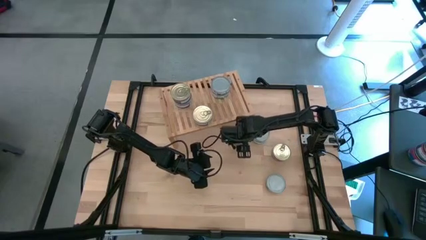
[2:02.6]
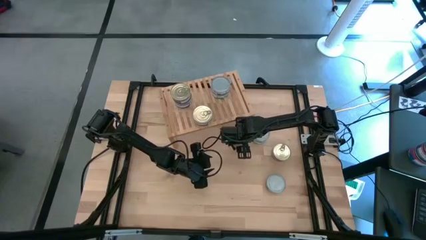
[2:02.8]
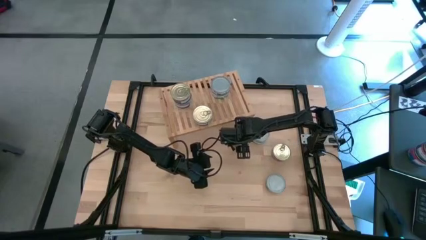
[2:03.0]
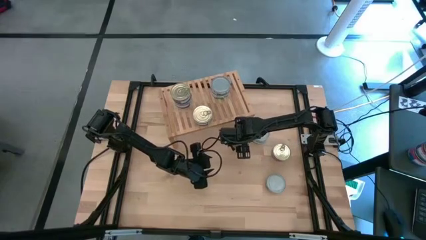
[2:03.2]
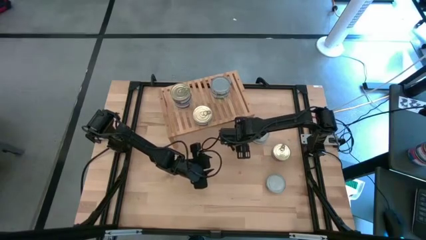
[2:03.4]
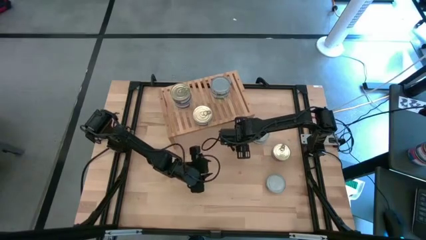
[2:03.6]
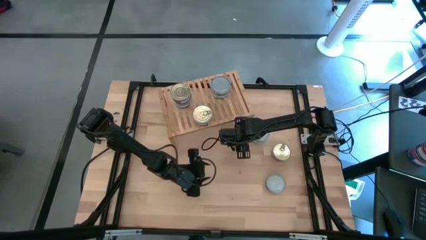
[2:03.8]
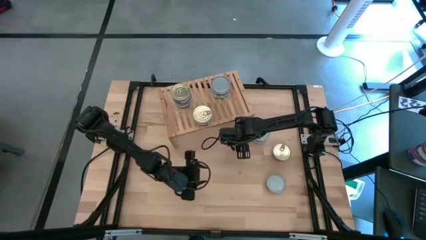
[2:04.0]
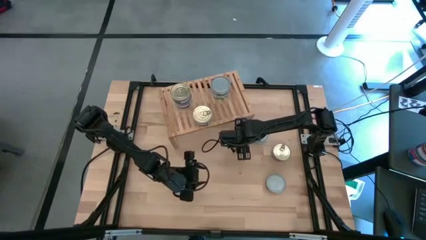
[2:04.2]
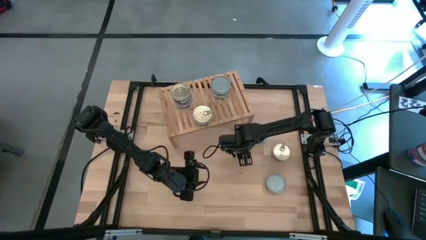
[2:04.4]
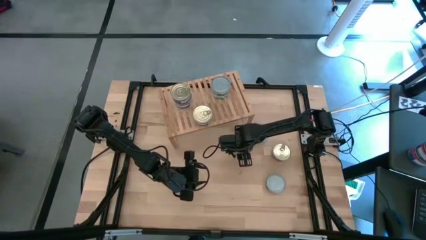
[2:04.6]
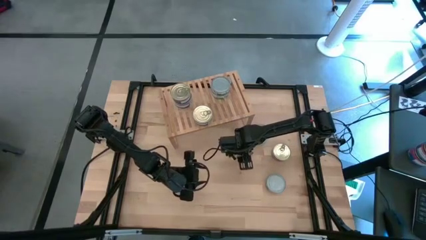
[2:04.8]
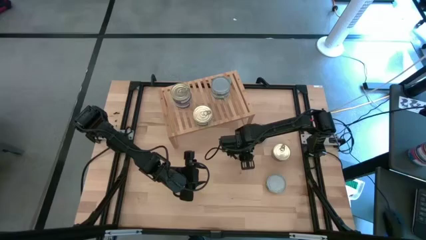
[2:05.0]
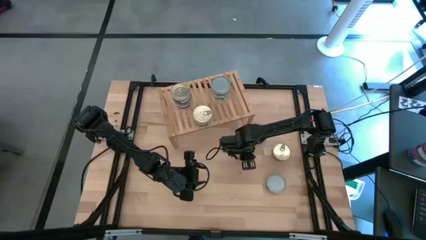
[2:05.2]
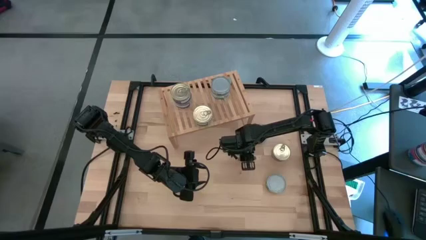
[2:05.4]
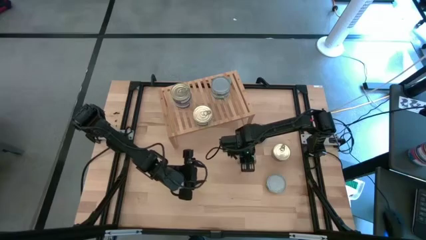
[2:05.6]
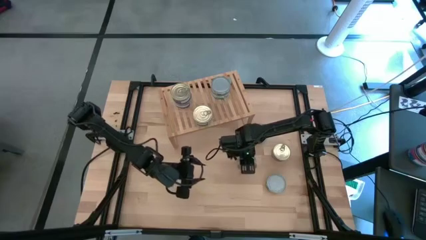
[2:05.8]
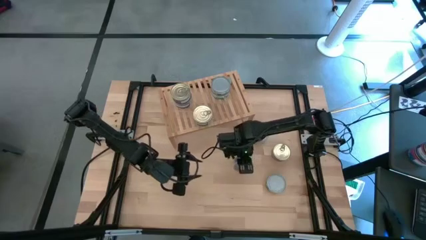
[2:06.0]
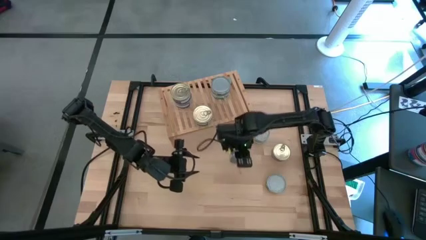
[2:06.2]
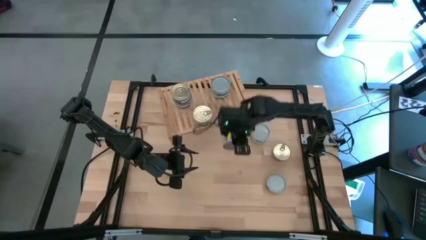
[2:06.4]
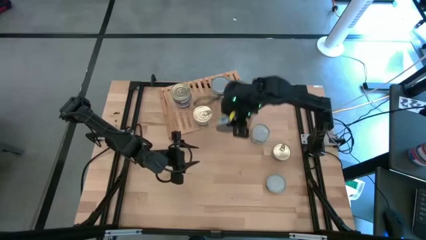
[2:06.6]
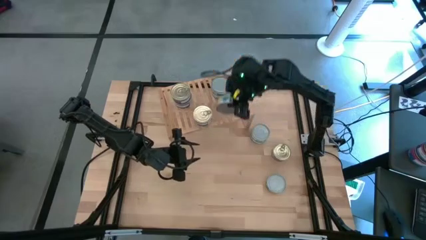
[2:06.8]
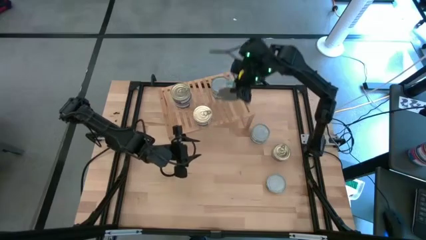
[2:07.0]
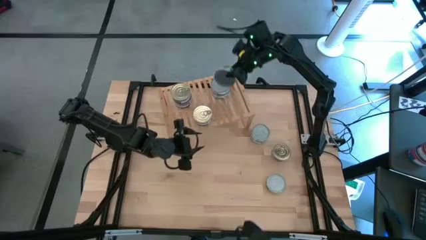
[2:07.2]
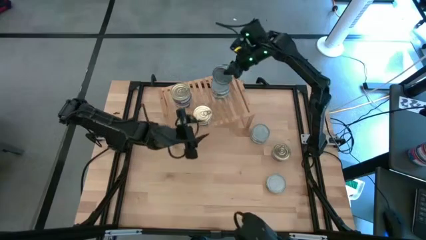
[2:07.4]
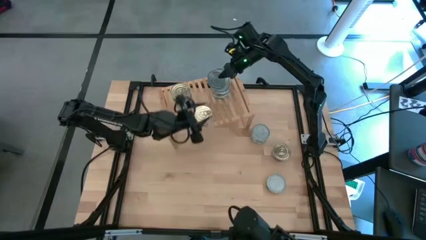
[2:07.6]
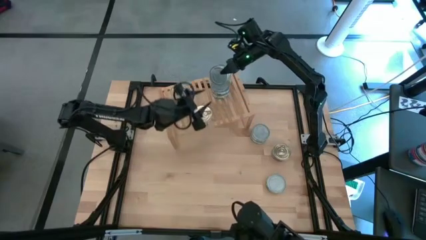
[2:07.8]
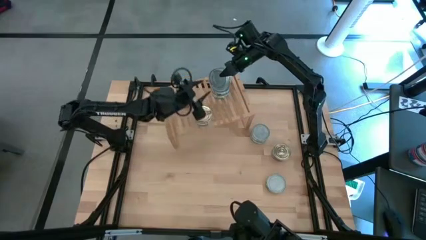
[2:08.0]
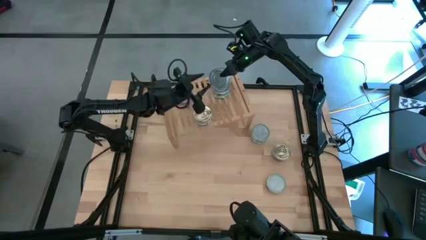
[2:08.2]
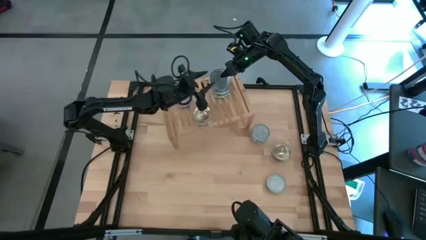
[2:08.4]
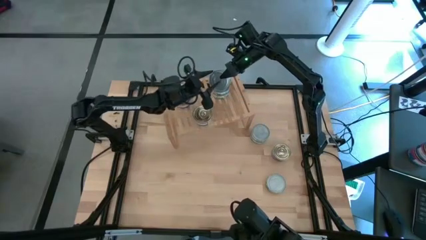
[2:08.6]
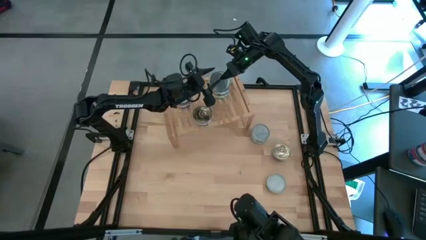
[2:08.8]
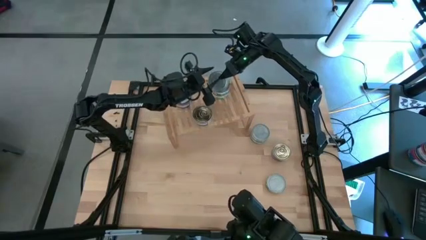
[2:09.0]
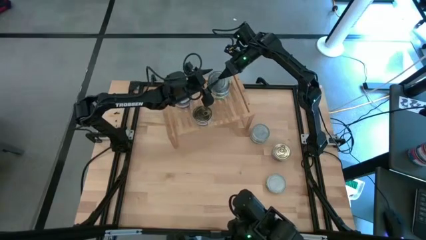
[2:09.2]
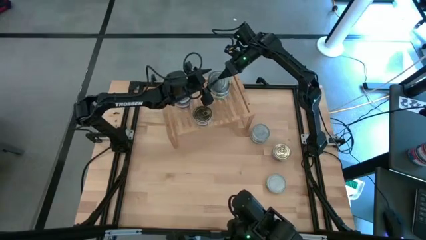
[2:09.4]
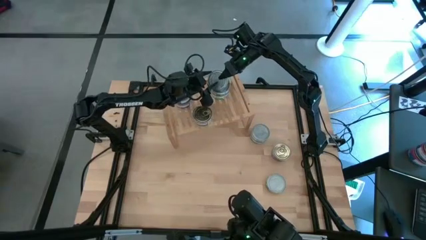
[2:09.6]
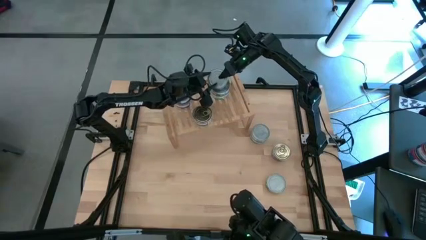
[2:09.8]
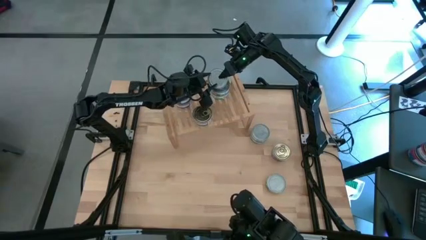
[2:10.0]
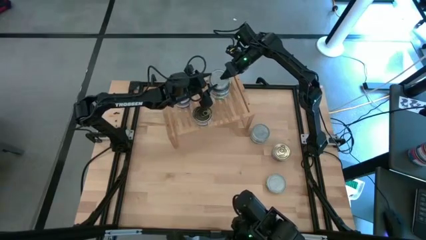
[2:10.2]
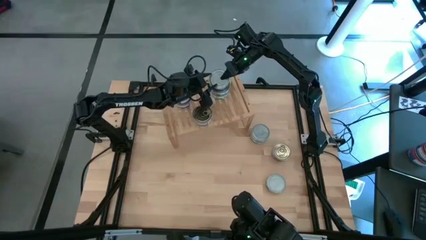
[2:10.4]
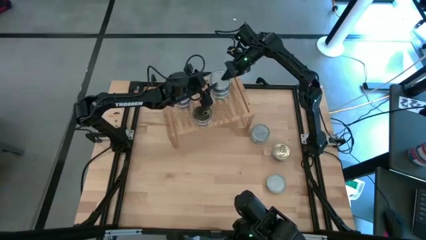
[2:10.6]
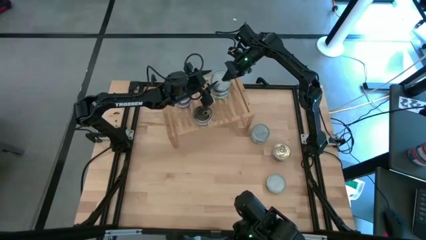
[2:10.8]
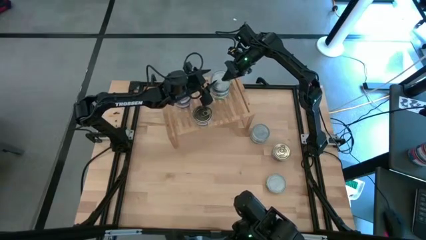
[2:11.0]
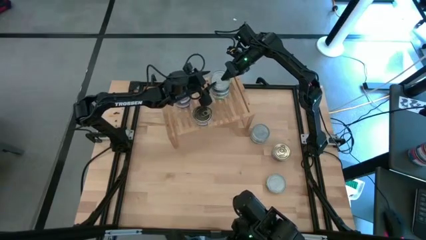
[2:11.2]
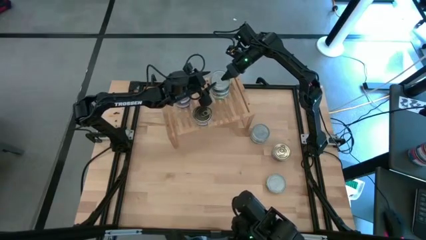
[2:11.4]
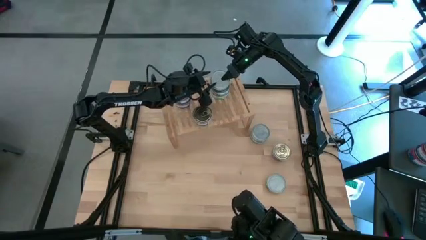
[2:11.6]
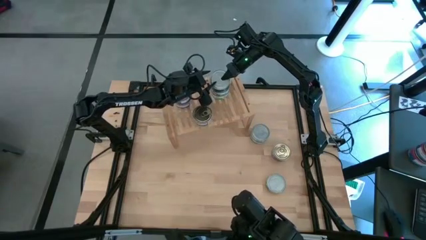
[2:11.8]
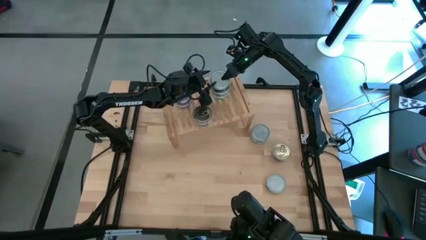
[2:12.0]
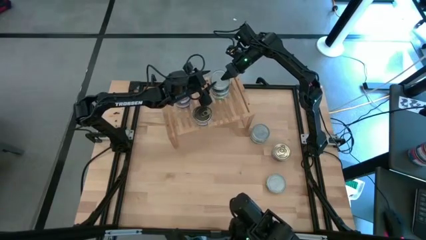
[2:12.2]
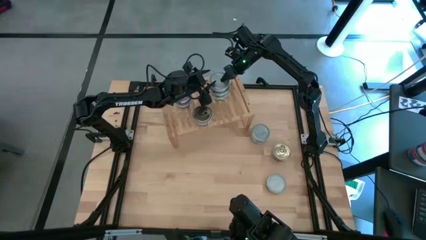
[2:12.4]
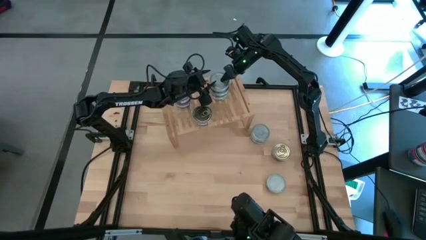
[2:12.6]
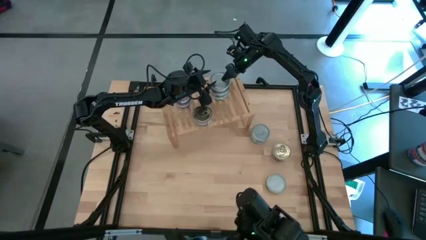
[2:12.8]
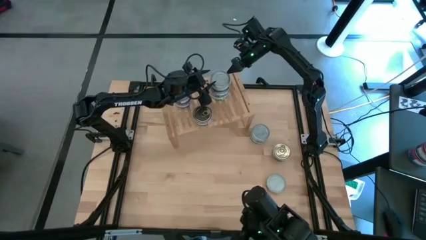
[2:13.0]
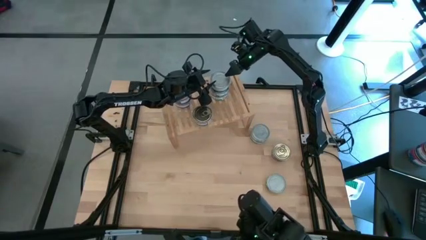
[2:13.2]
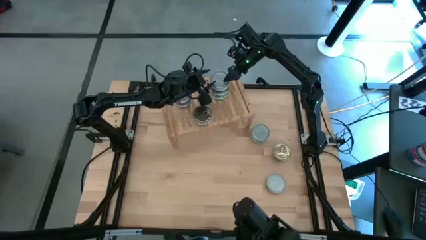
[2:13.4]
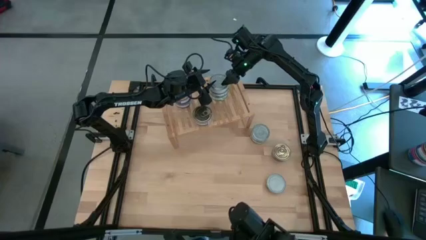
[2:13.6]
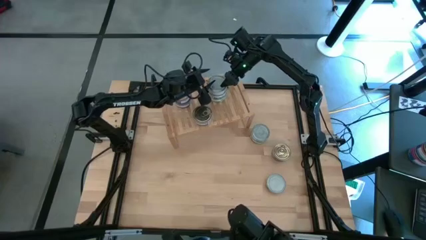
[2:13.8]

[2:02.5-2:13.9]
Task: Stack canned seafood by type on shelf
Stack the green tuna can on top of the green tuna can on the shelf
